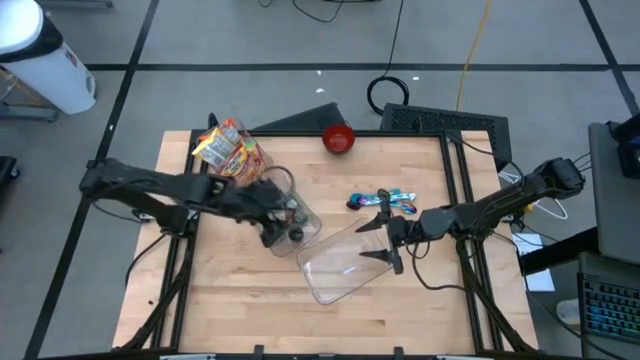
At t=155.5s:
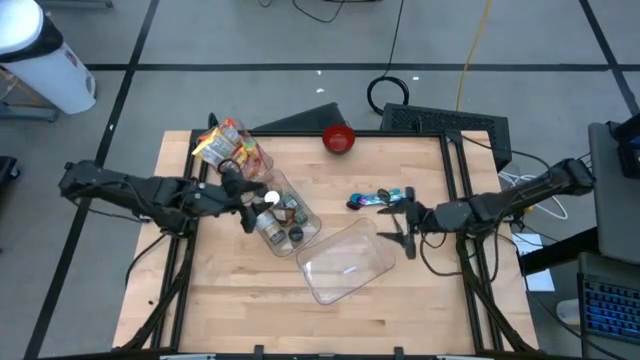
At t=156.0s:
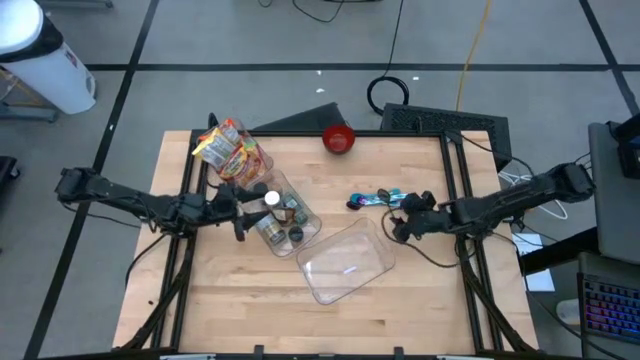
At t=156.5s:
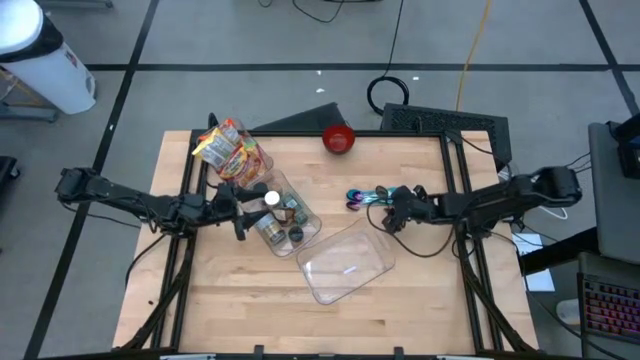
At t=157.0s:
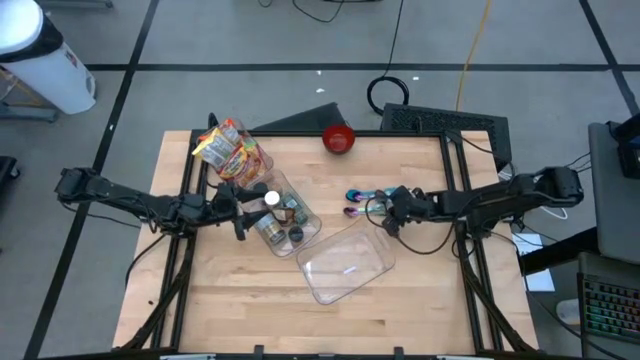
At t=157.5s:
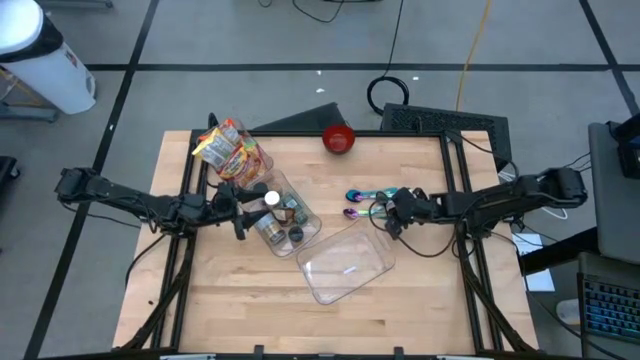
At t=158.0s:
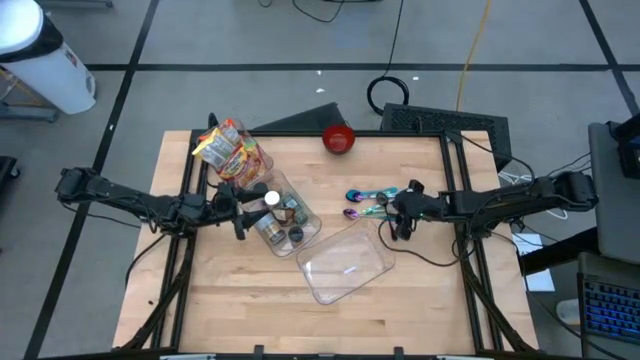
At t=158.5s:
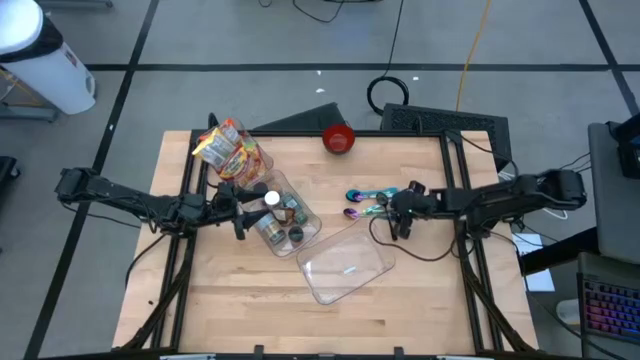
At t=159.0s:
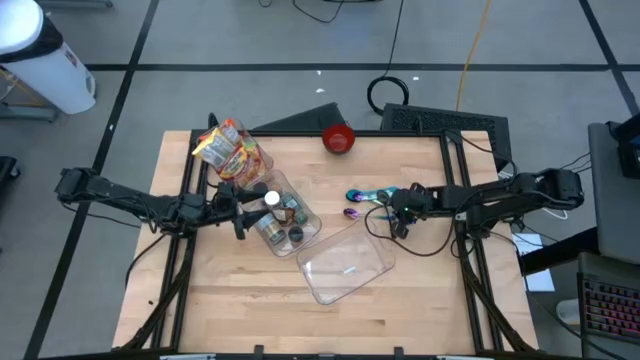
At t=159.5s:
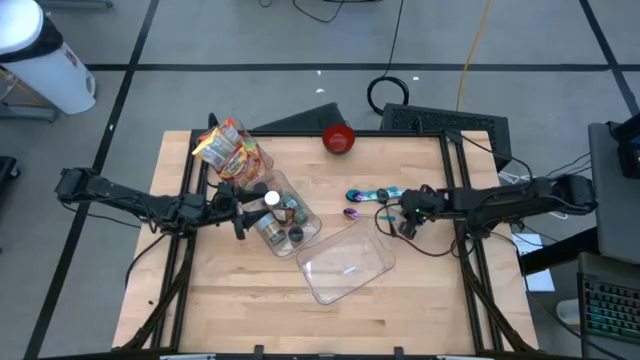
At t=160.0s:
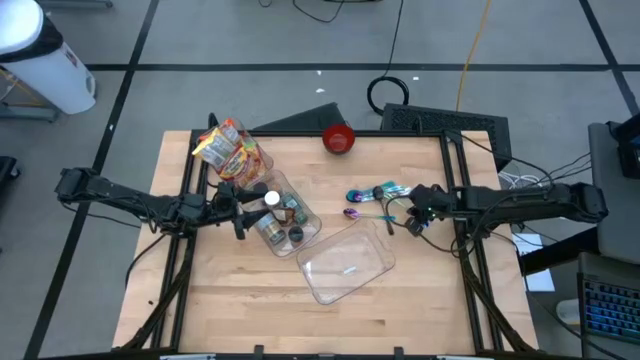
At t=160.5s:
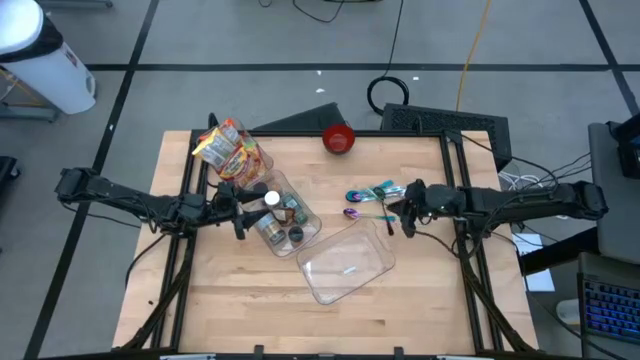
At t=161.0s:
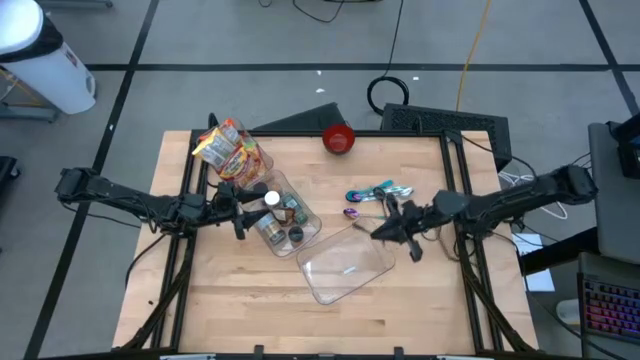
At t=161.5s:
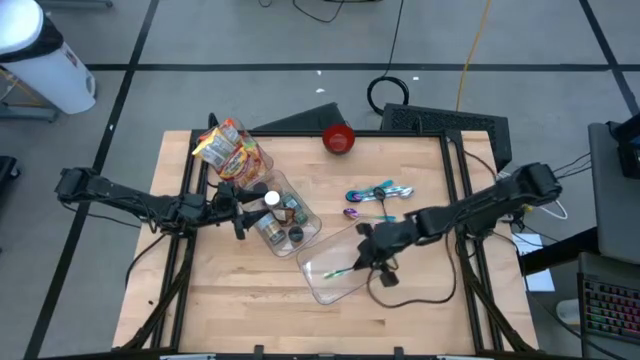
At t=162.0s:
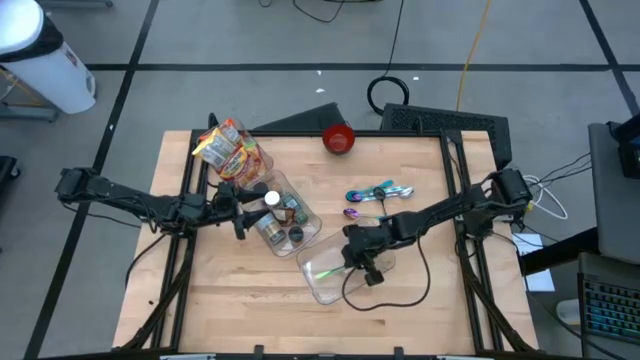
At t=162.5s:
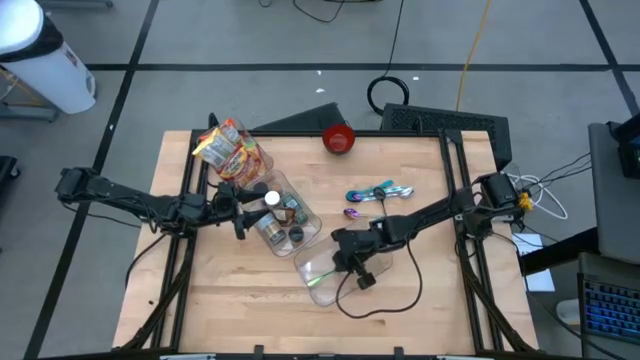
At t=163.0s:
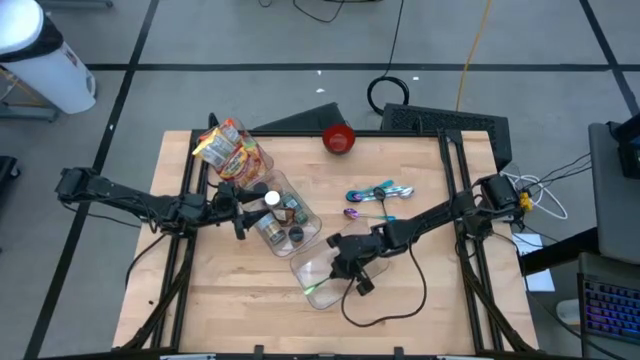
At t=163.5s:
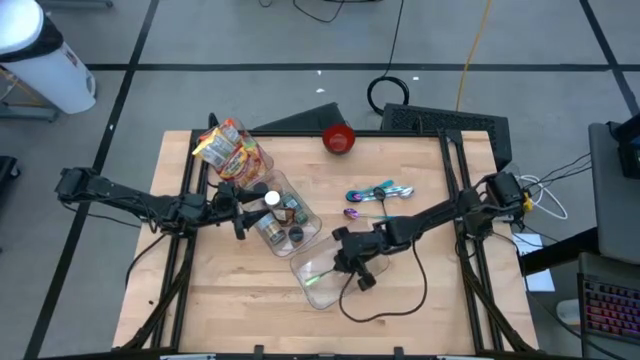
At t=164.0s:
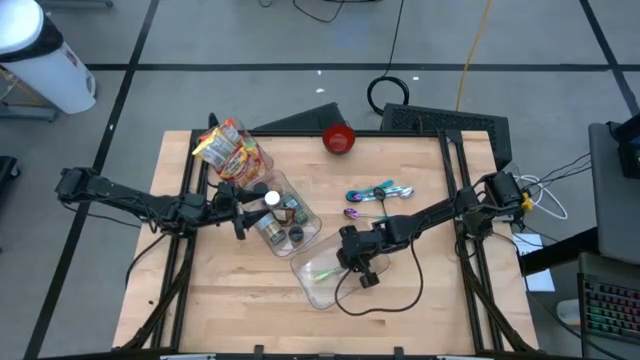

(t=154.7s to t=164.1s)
Task: Pick & Place Food Item
Put the middle green spoon into the bottom transparent bin

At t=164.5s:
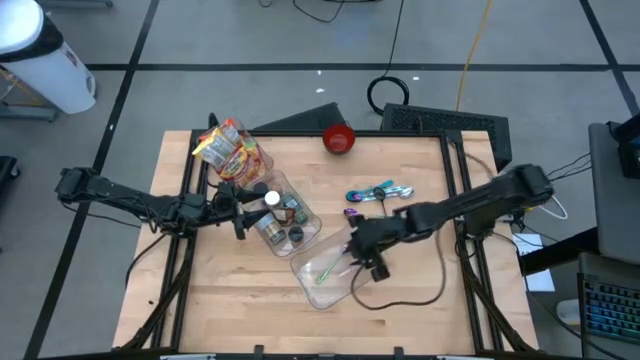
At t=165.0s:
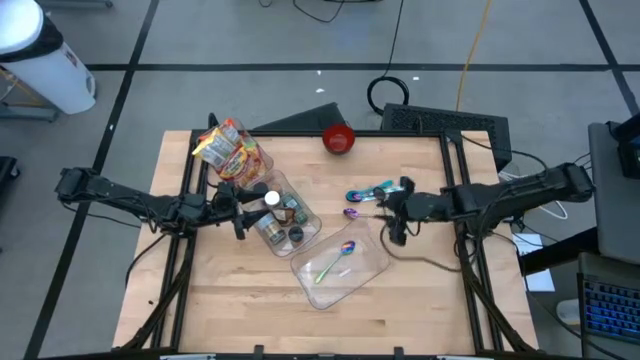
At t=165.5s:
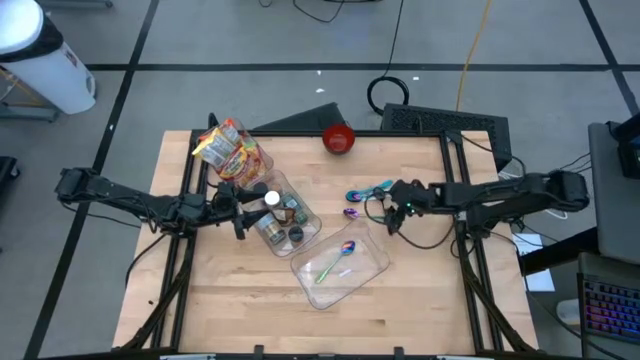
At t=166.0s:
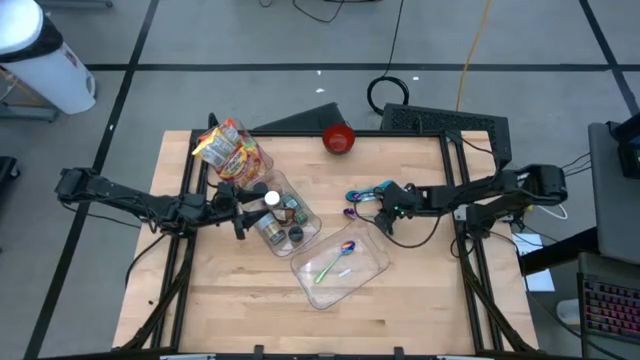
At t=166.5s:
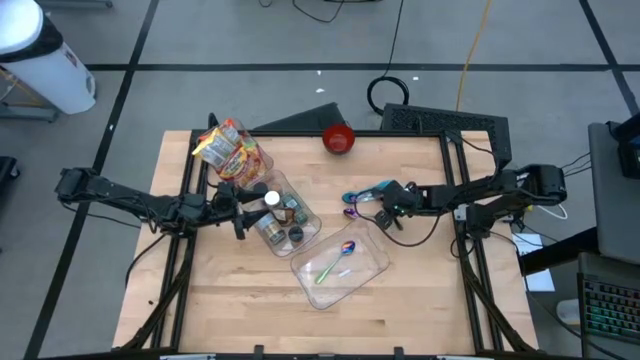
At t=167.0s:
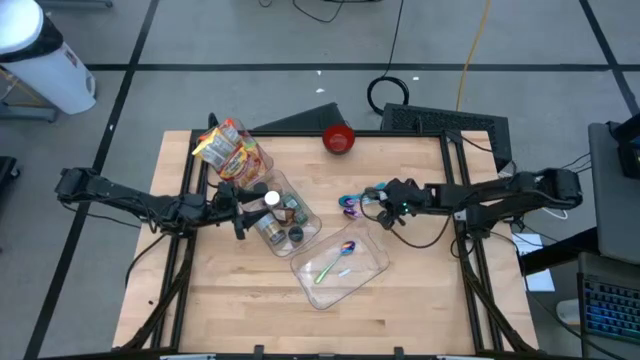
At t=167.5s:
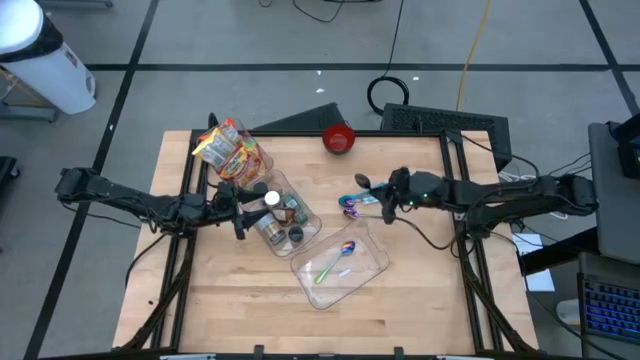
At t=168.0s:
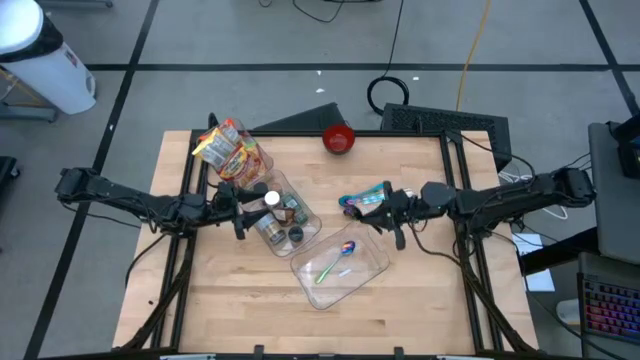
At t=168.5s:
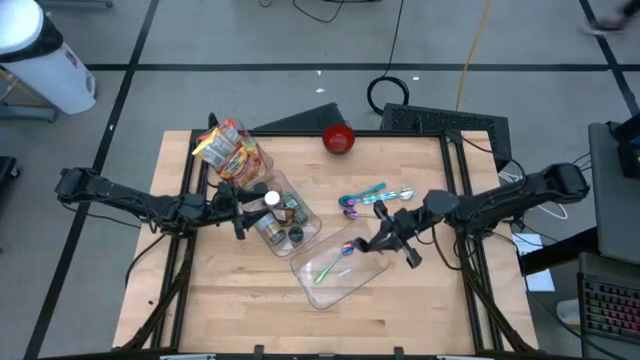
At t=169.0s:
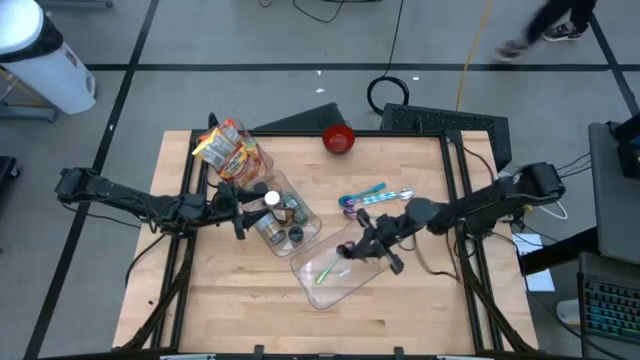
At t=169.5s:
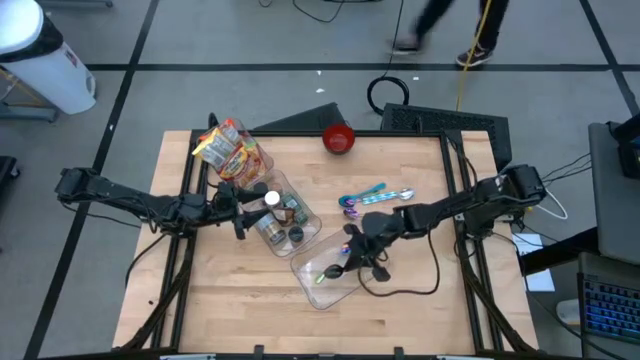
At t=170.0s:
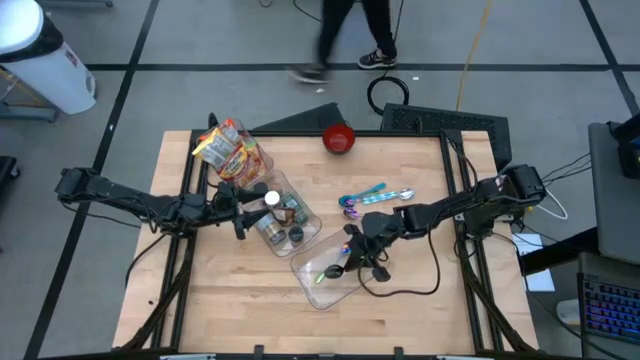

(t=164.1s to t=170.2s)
Put the black spoon into the bottom transparent bin

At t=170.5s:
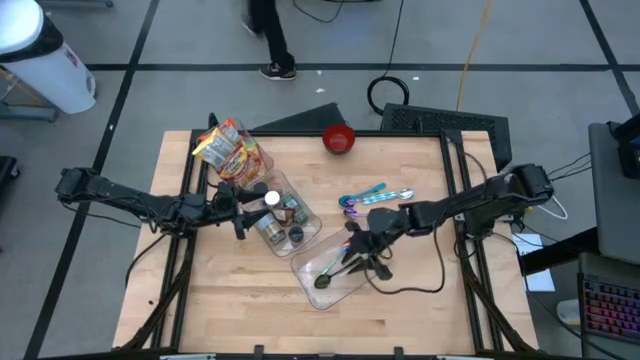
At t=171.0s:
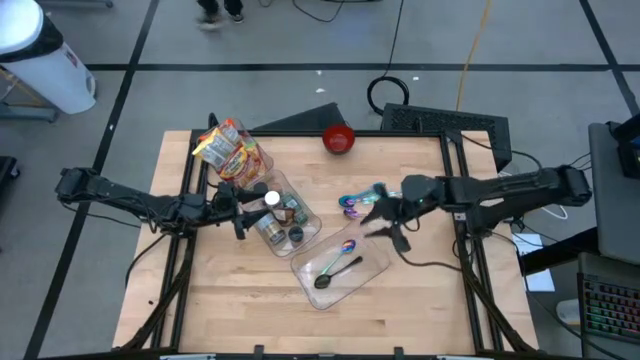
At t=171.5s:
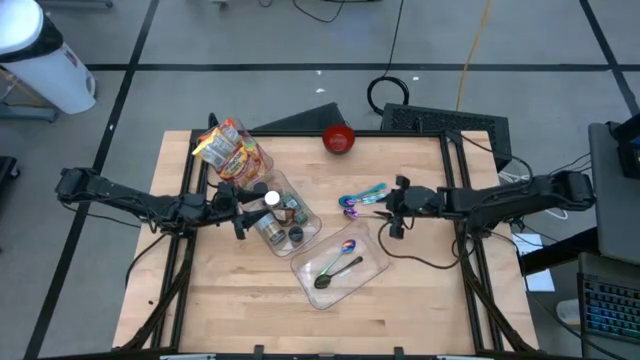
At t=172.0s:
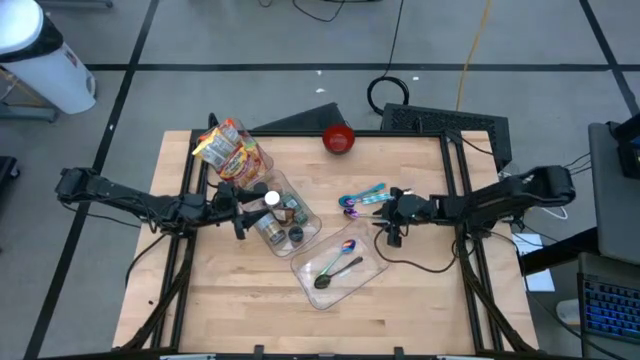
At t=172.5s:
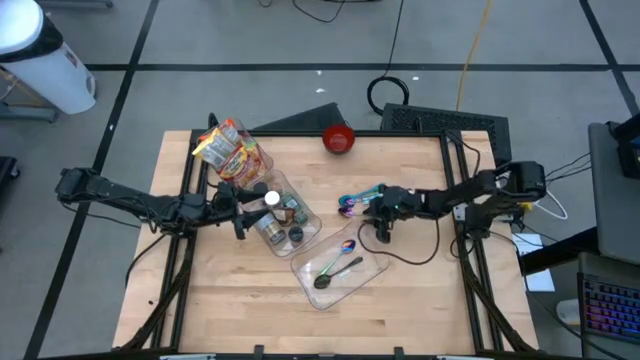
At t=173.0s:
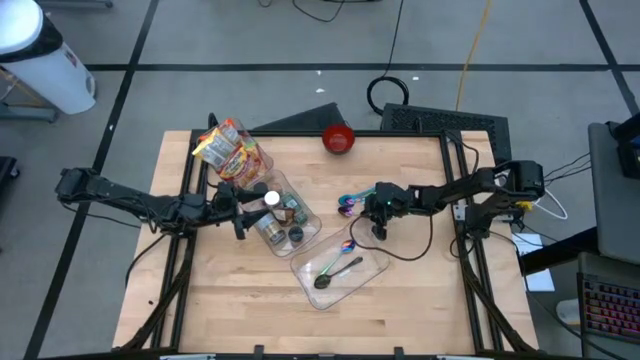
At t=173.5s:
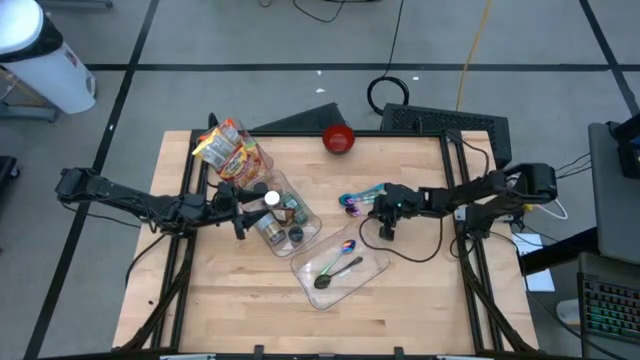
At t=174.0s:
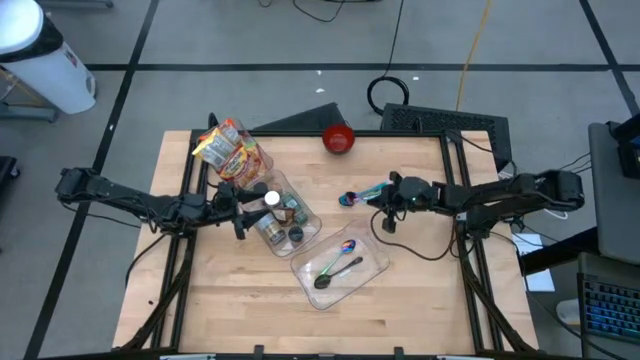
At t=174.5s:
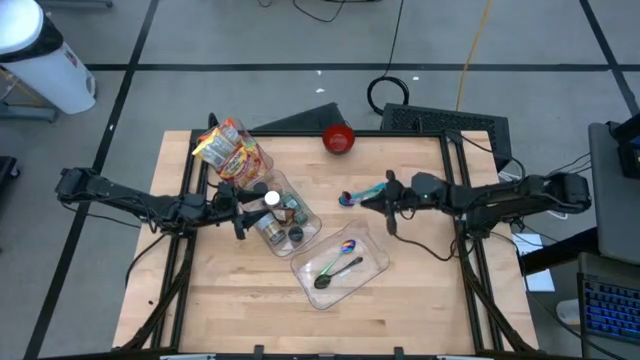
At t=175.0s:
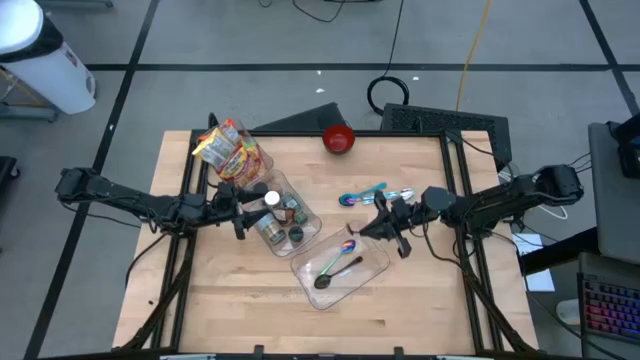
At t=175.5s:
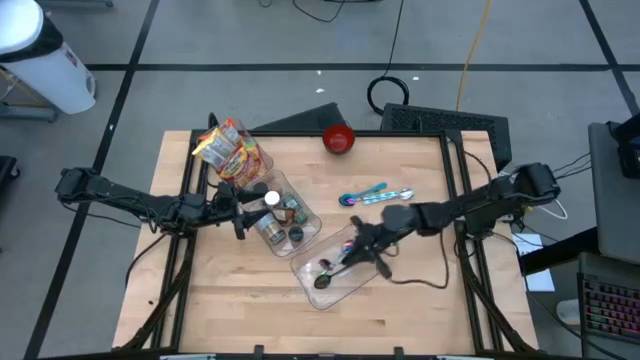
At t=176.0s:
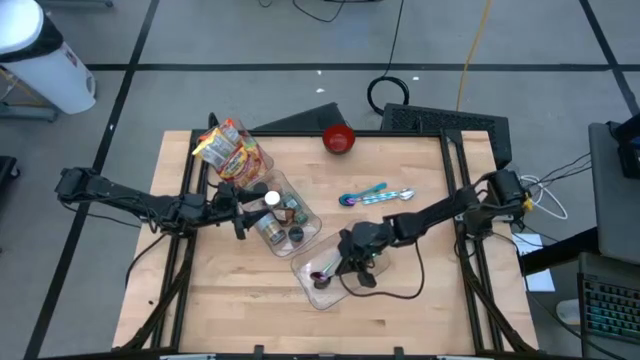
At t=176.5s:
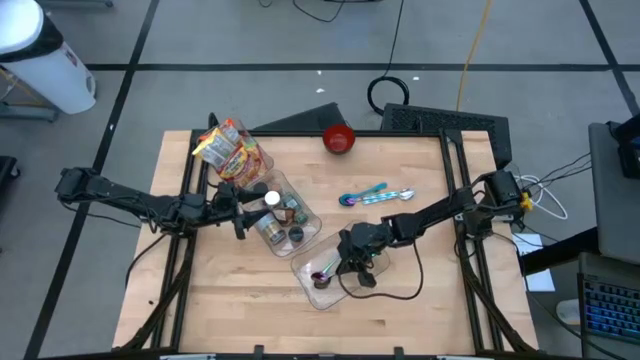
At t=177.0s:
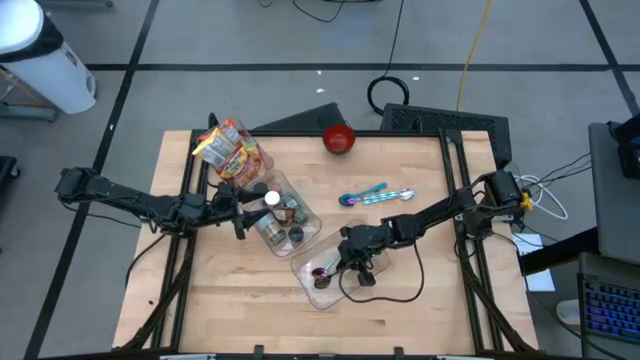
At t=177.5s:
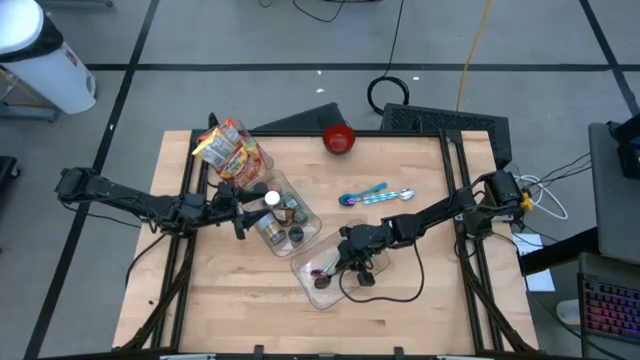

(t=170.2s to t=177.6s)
Put the bottom green spoon into the bottom transparent bin
